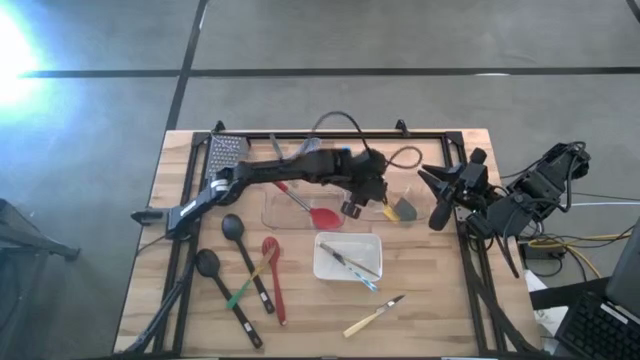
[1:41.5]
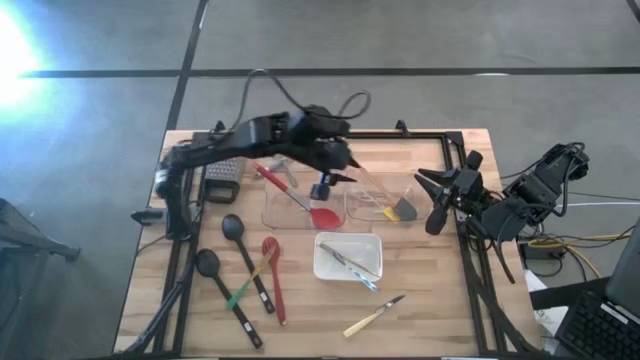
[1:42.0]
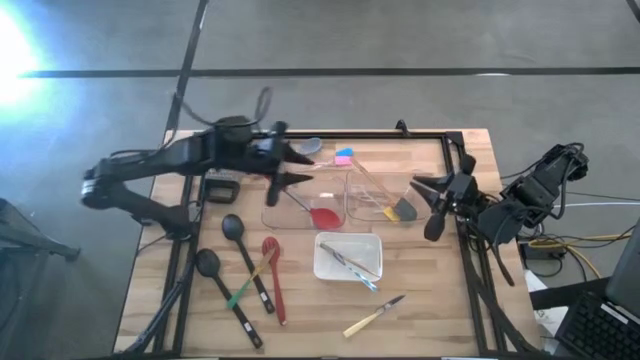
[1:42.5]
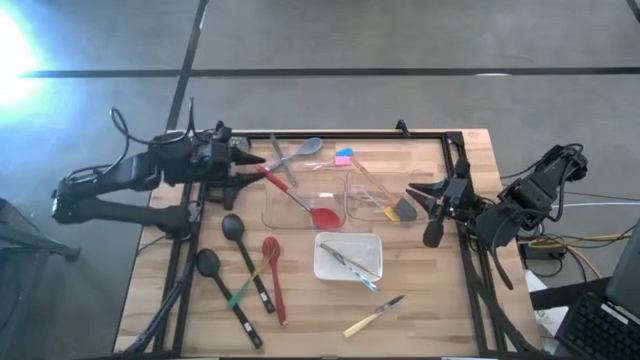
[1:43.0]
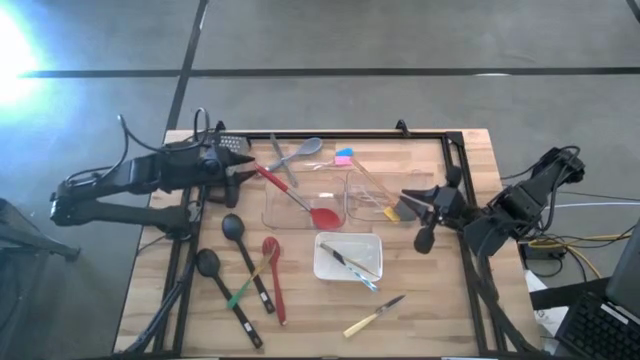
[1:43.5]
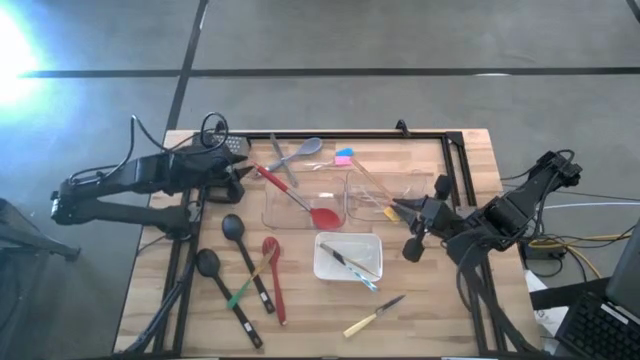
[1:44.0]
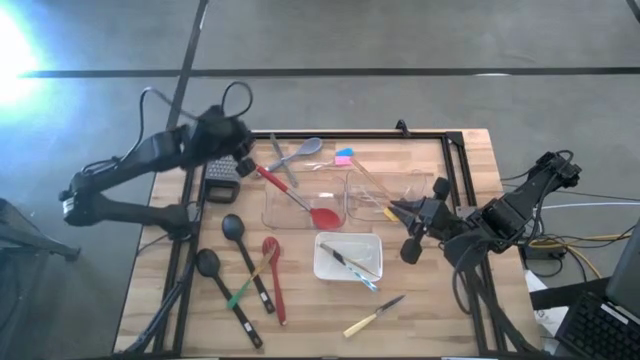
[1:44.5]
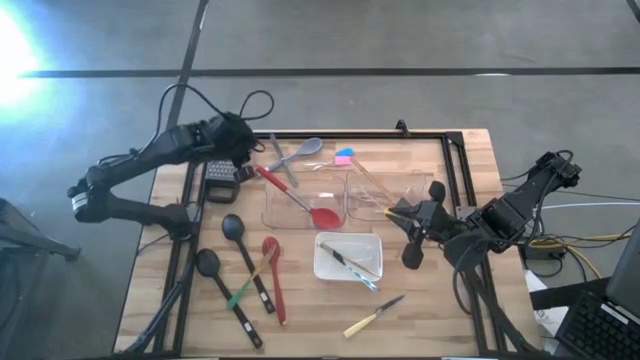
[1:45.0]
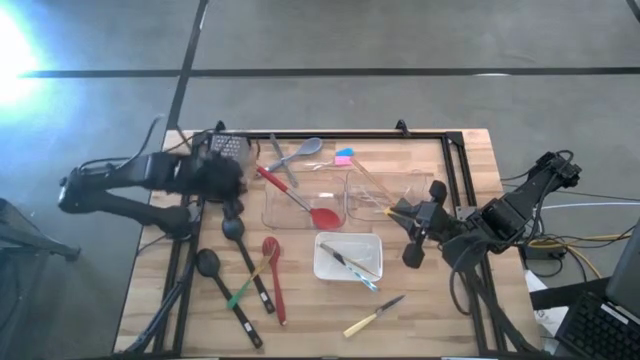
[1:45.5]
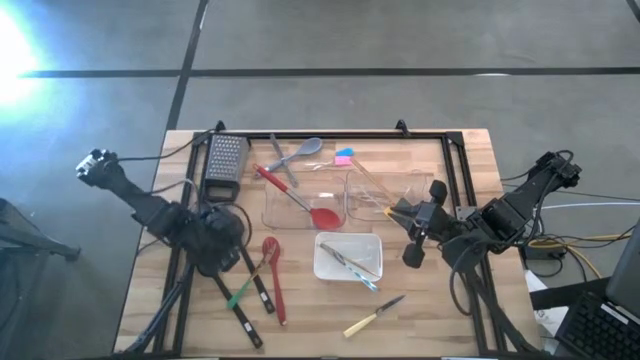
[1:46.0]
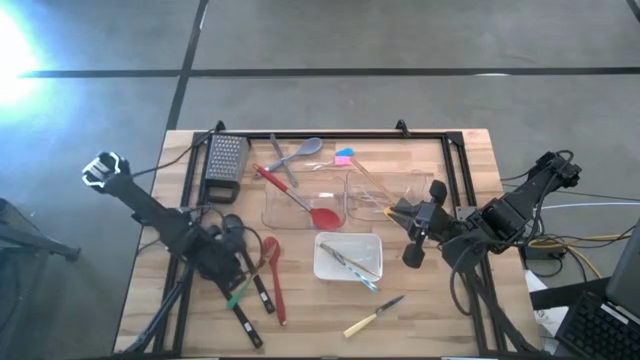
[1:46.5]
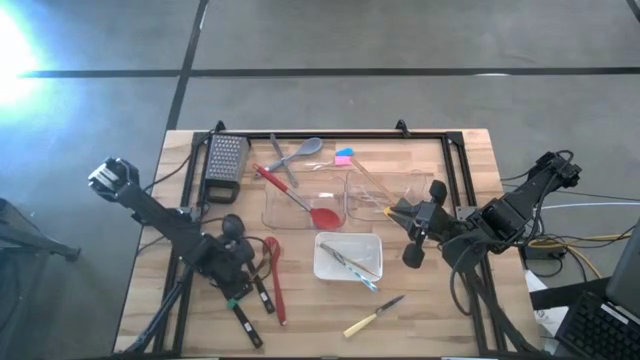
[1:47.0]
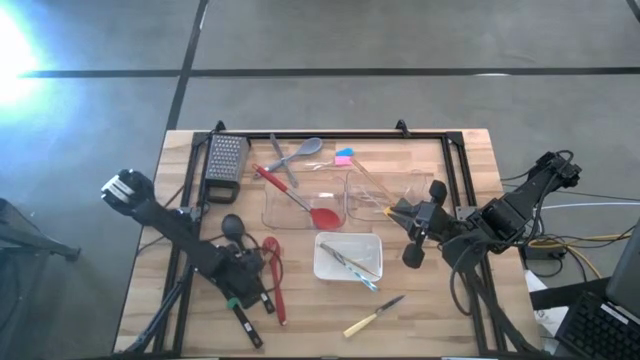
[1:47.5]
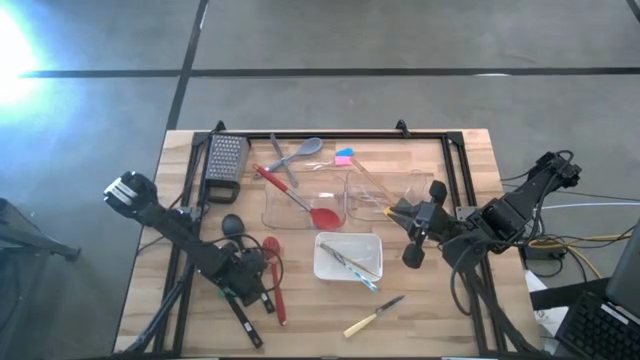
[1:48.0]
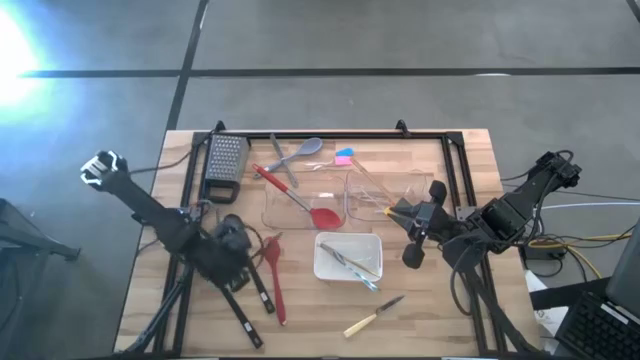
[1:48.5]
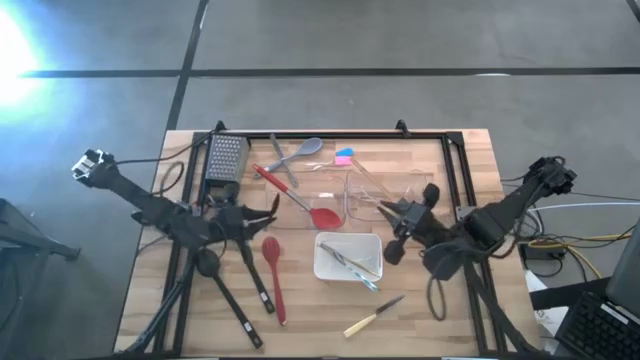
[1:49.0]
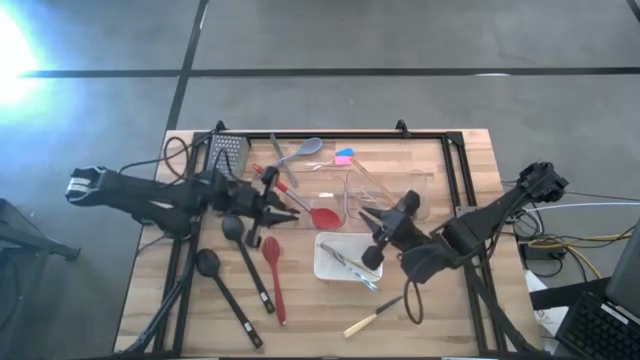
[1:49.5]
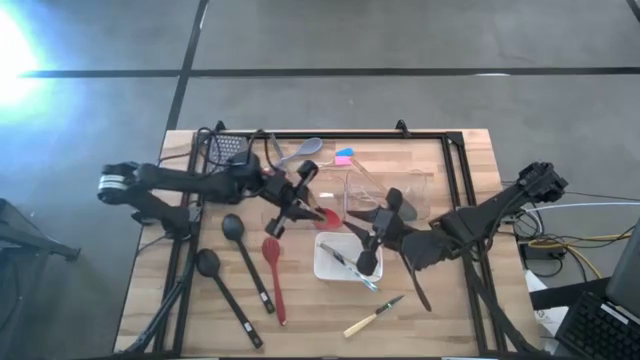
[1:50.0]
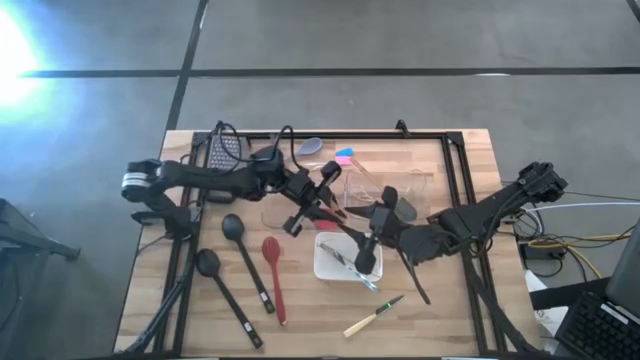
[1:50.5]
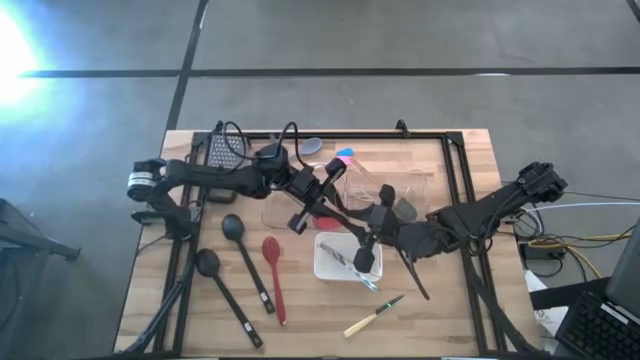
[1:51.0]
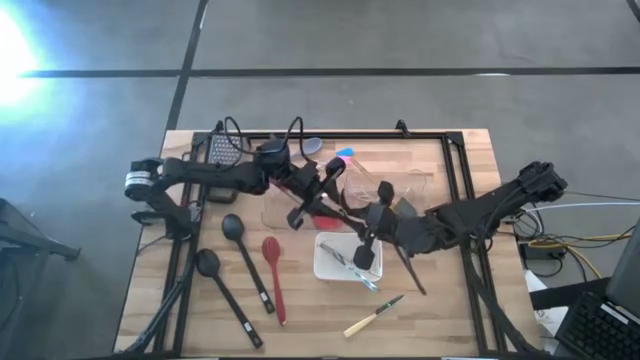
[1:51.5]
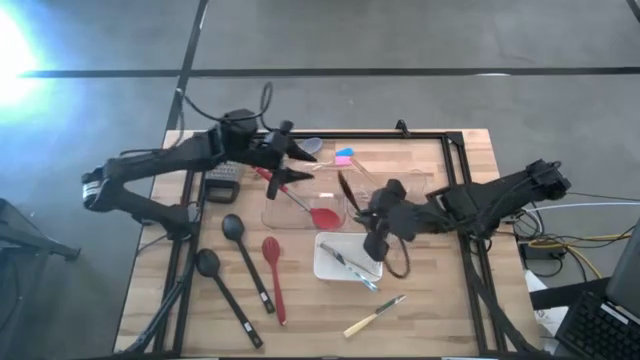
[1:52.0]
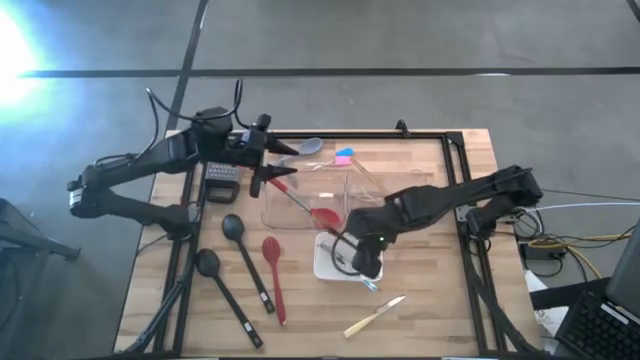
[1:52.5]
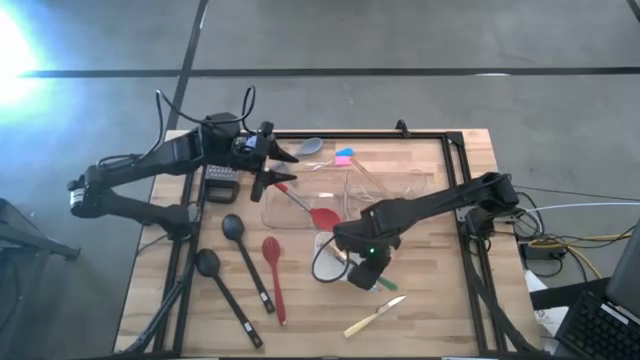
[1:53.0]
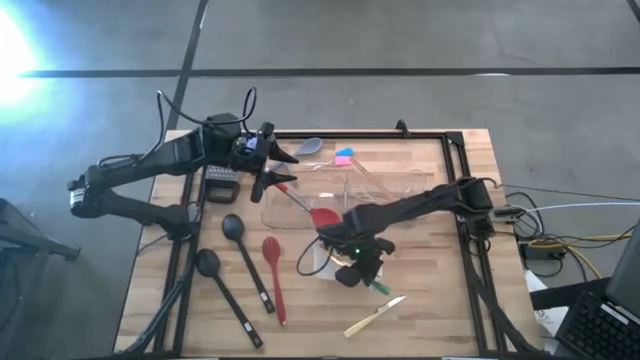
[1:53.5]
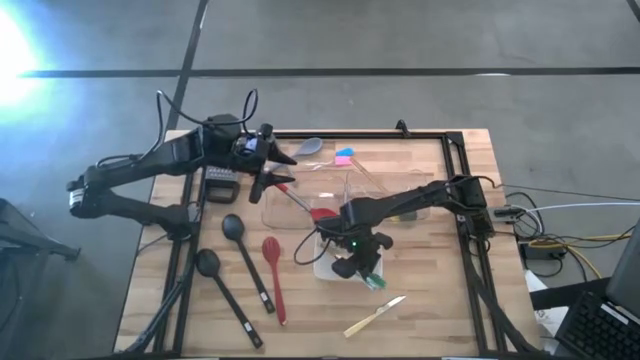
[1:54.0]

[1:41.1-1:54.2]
Task: Pick & Place Kitchen Items
Put the green table knife into the white bin

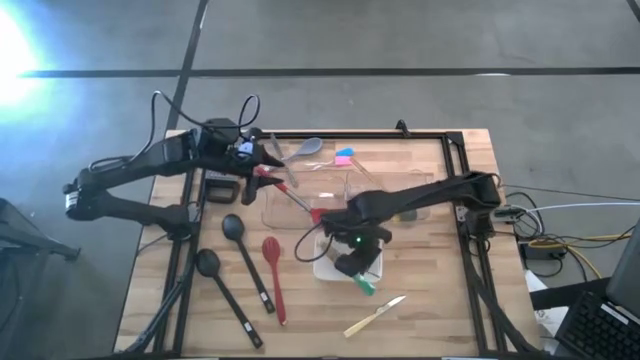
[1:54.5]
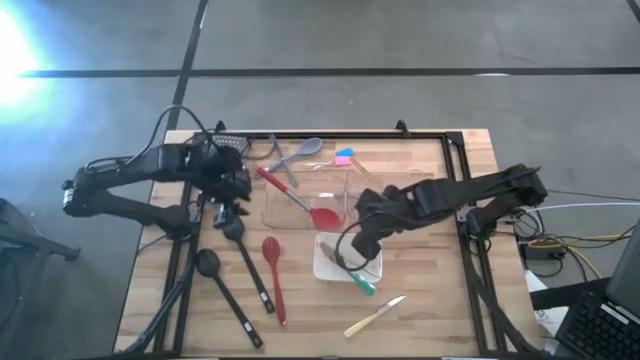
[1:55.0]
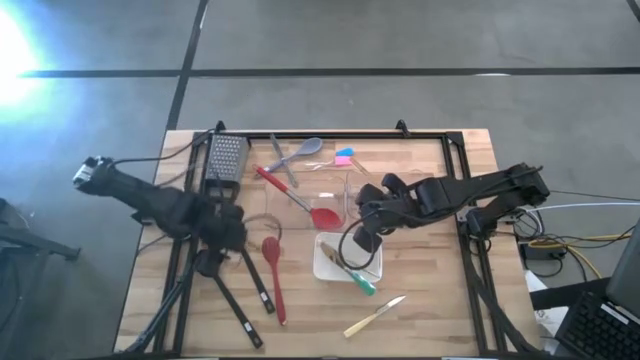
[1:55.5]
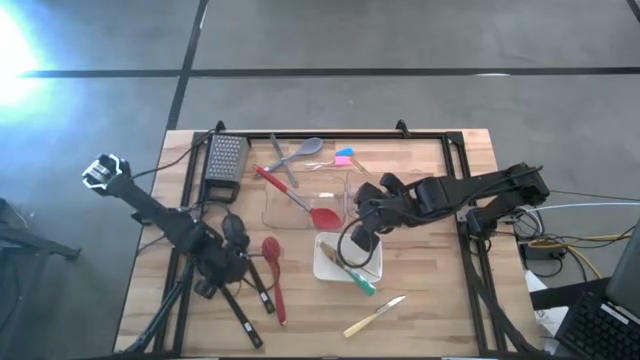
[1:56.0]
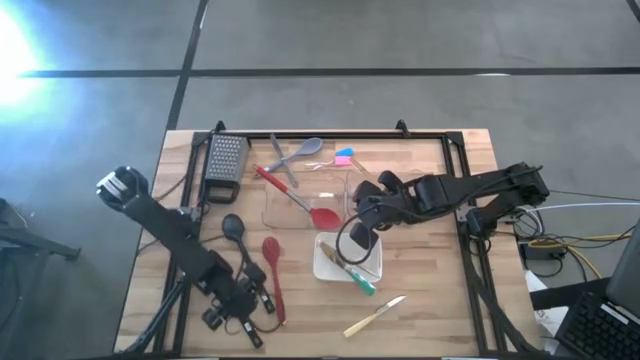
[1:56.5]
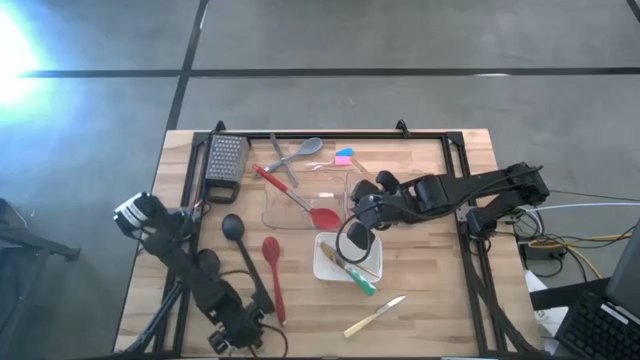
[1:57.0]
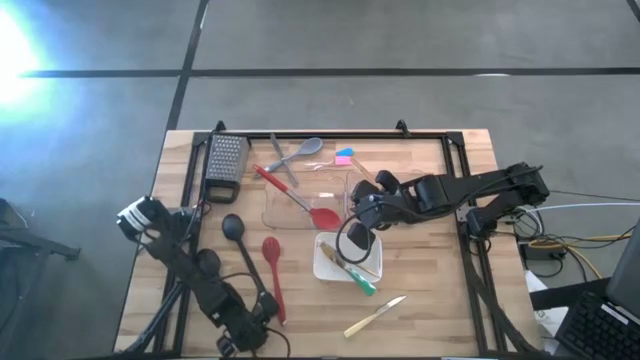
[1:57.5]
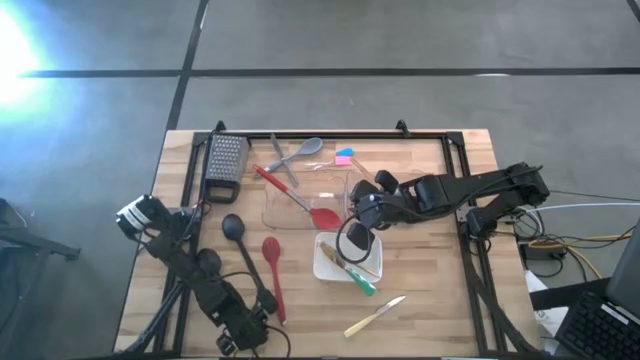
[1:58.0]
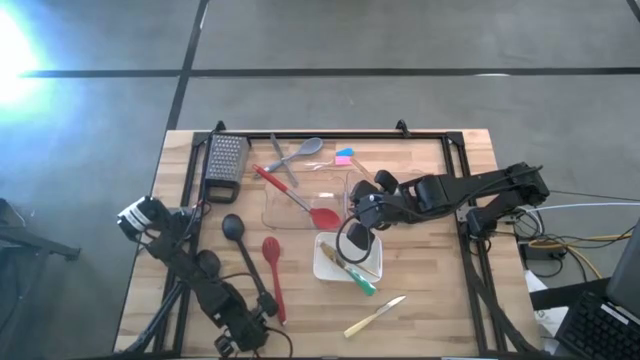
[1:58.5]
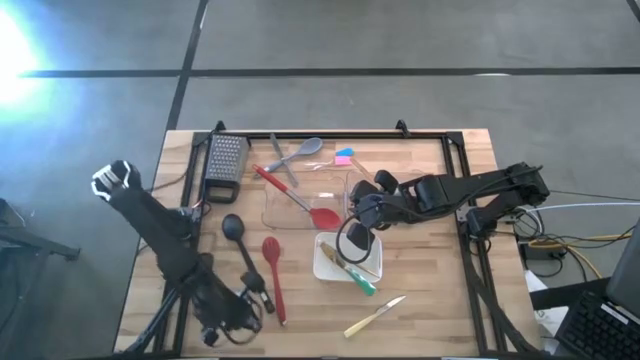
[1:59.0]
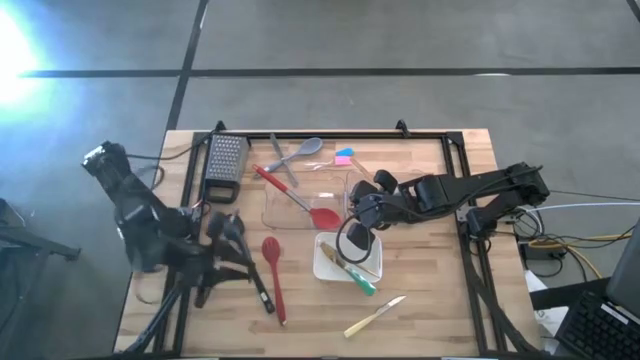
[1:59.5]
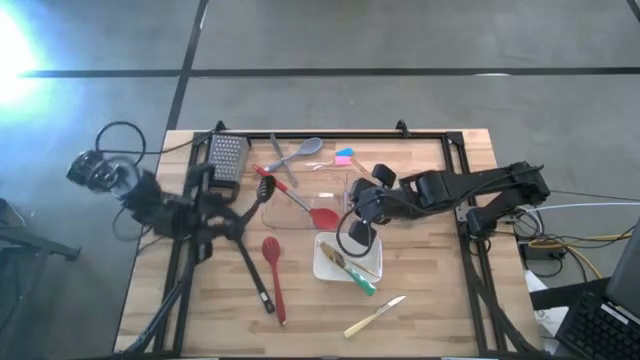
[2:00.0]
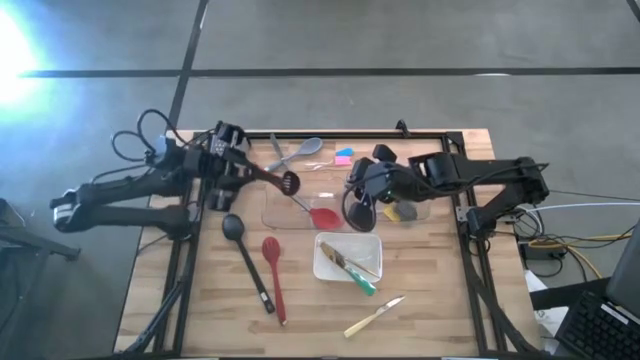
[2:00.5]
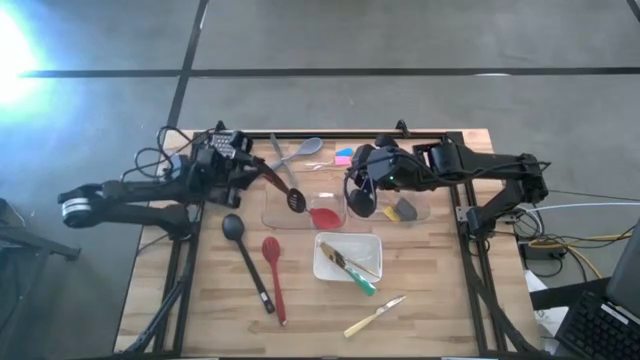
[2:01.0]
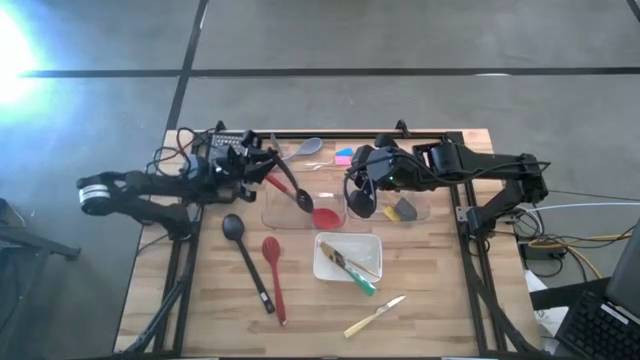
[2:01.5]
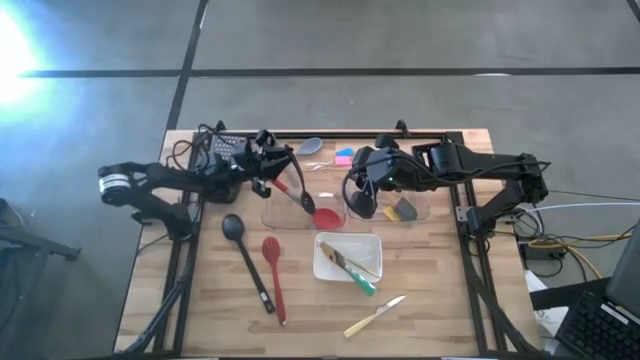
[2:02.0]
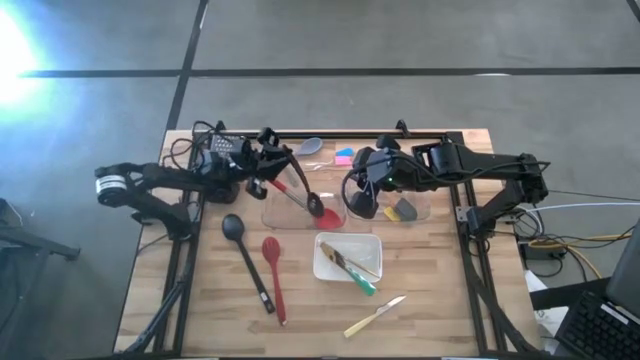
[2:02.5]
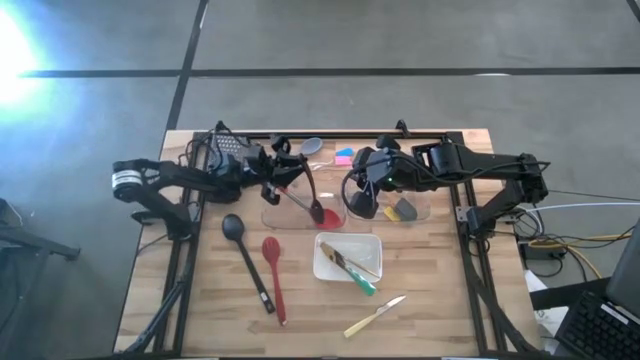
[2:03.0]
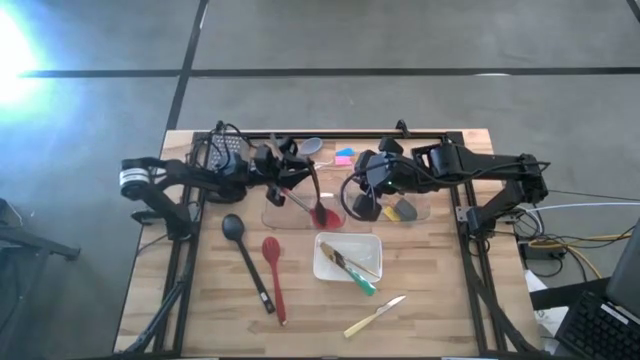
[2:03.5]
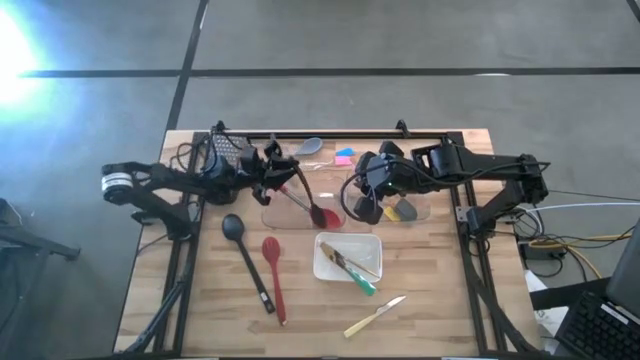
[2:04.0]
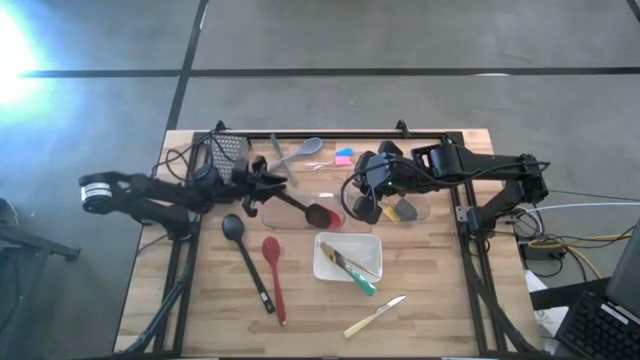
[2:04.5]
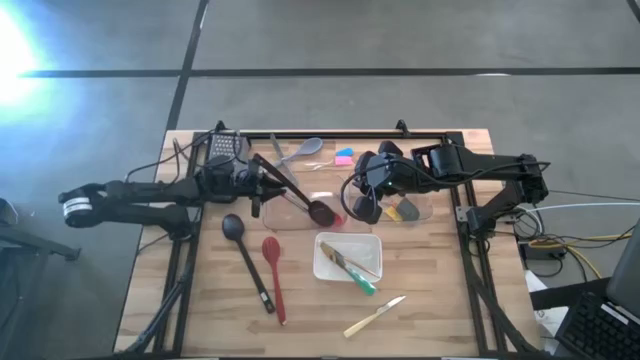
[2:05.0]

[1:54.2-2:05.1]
Put the black serving spoon into the left transparent bin
